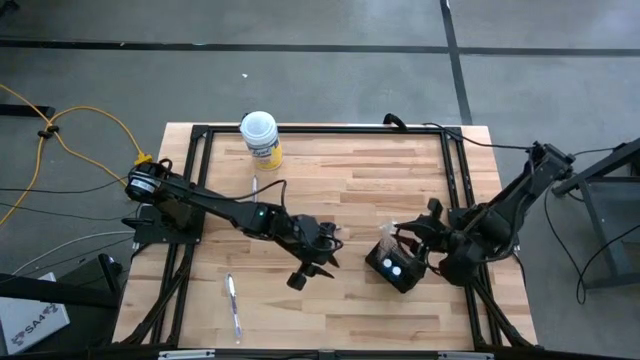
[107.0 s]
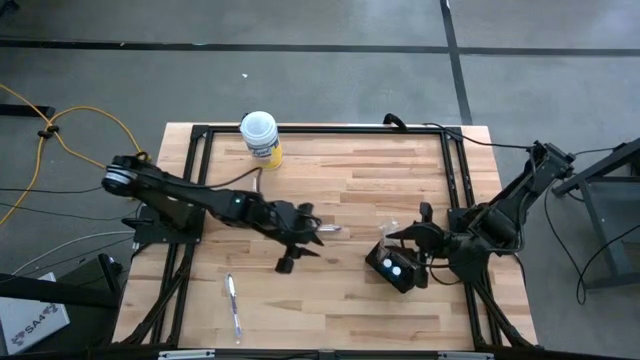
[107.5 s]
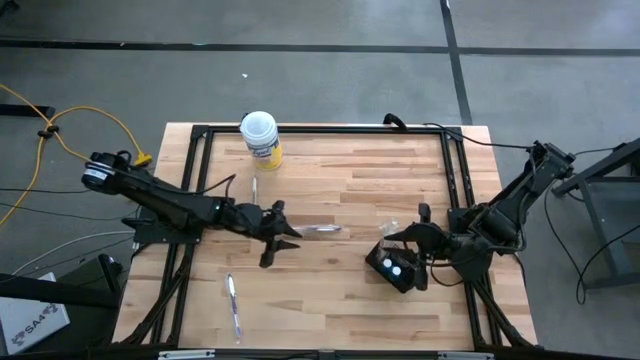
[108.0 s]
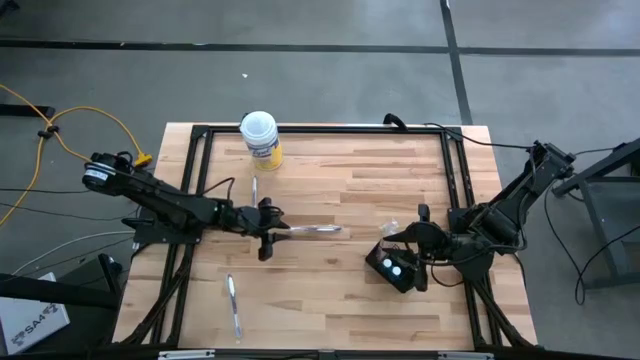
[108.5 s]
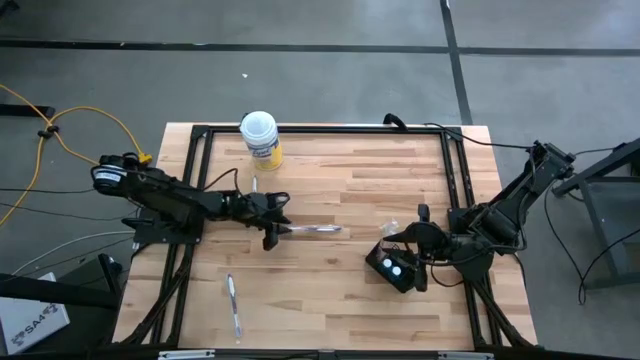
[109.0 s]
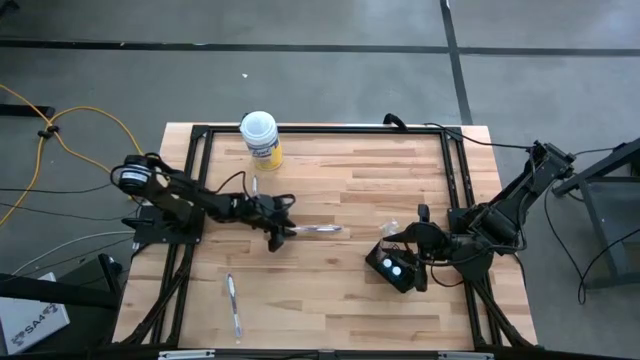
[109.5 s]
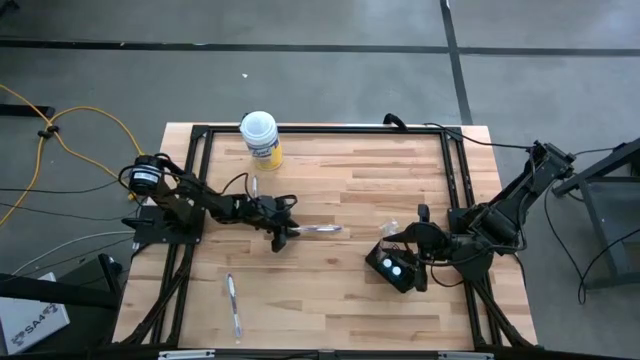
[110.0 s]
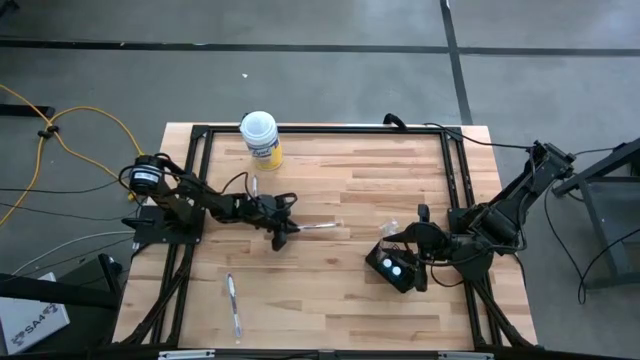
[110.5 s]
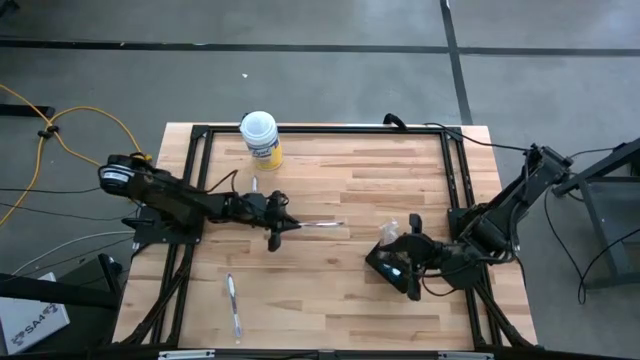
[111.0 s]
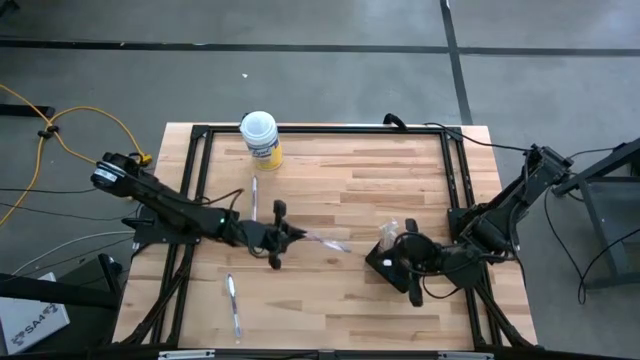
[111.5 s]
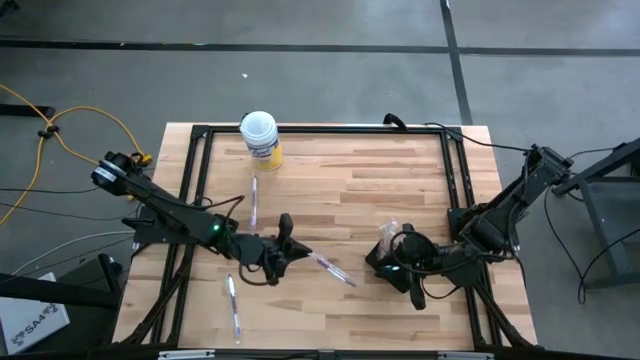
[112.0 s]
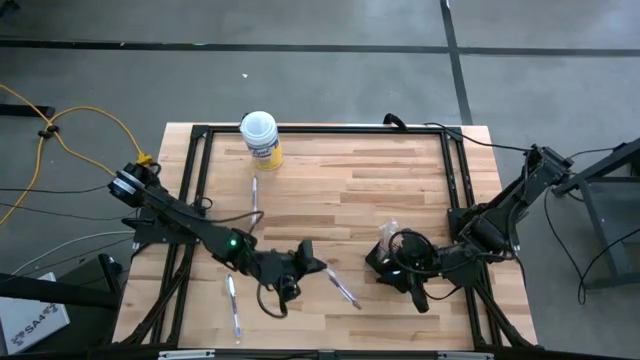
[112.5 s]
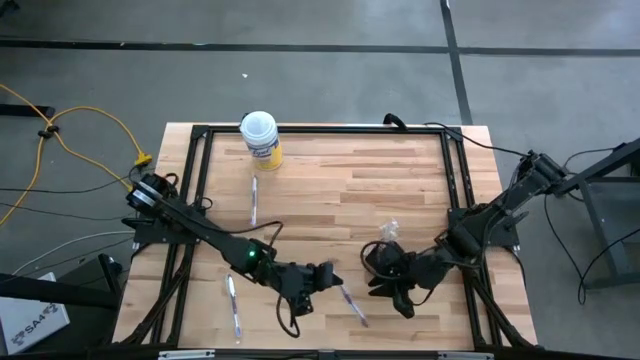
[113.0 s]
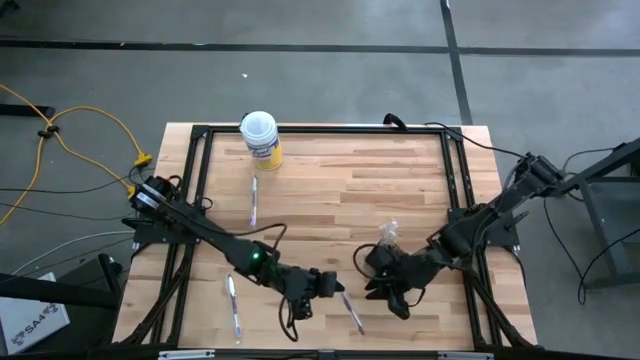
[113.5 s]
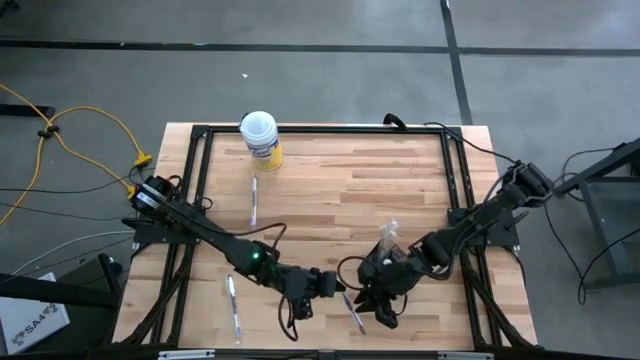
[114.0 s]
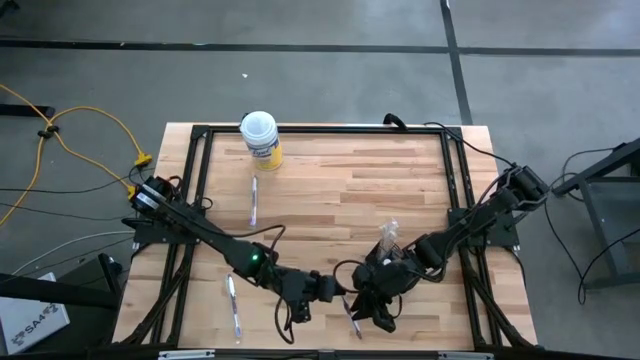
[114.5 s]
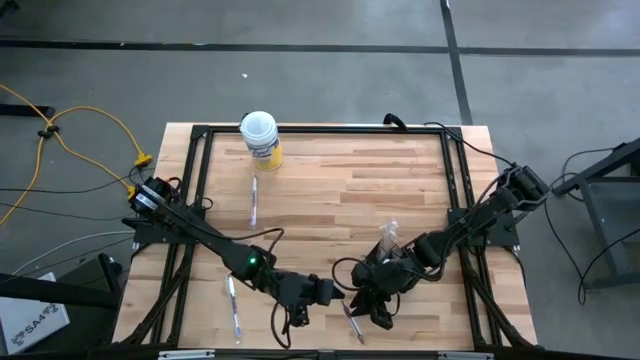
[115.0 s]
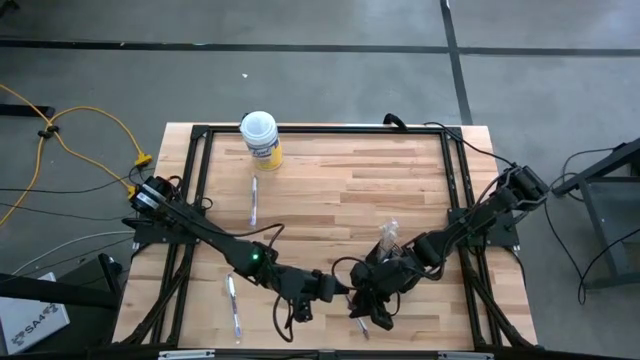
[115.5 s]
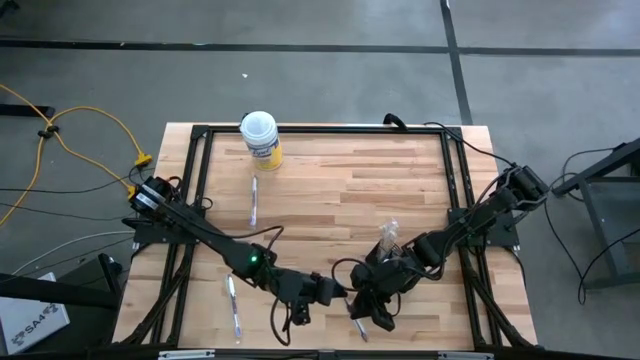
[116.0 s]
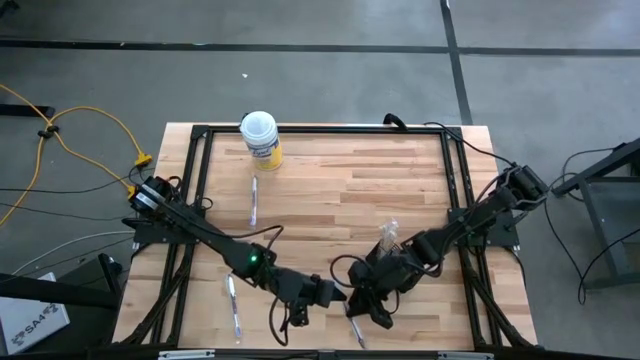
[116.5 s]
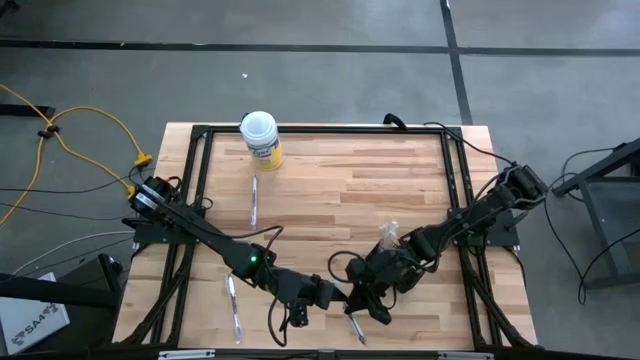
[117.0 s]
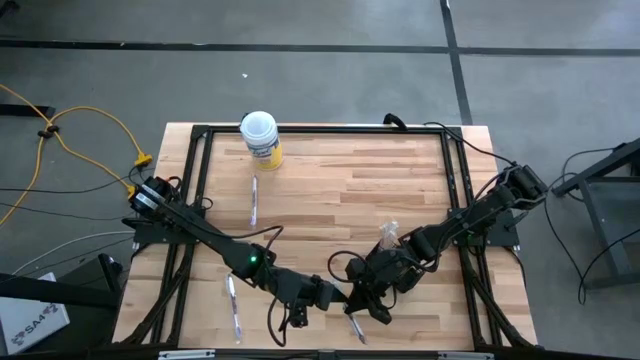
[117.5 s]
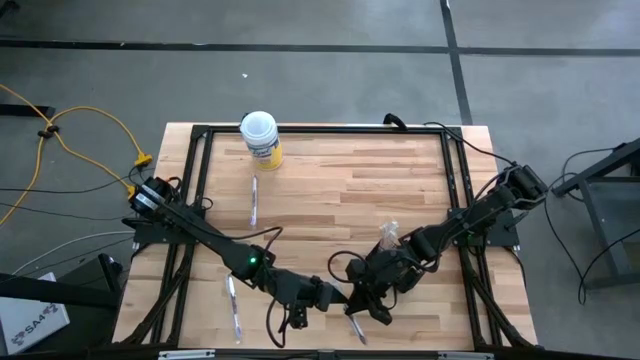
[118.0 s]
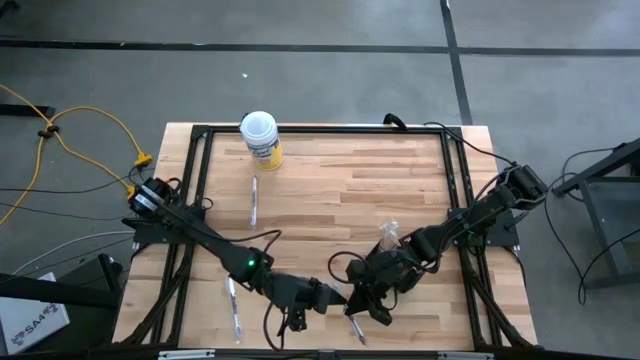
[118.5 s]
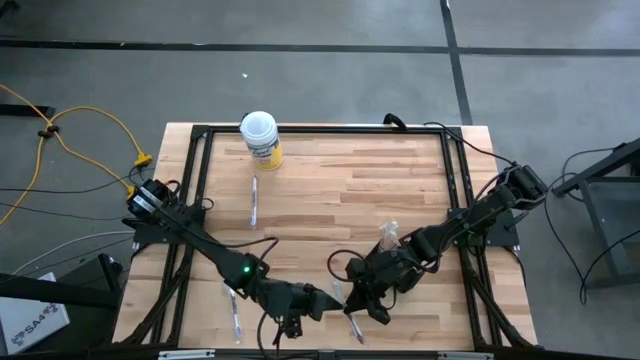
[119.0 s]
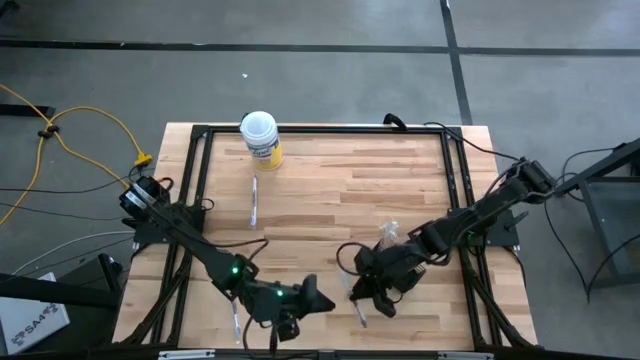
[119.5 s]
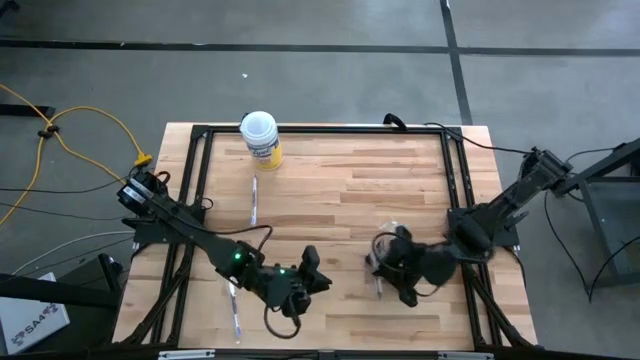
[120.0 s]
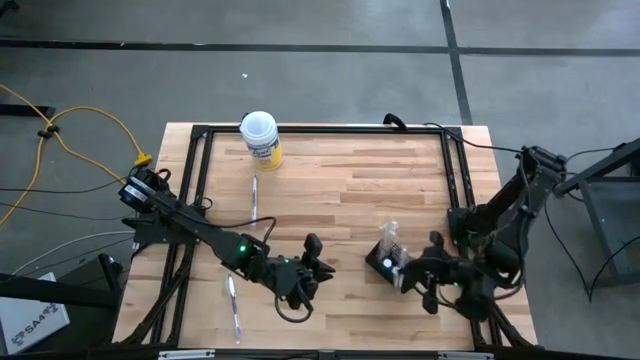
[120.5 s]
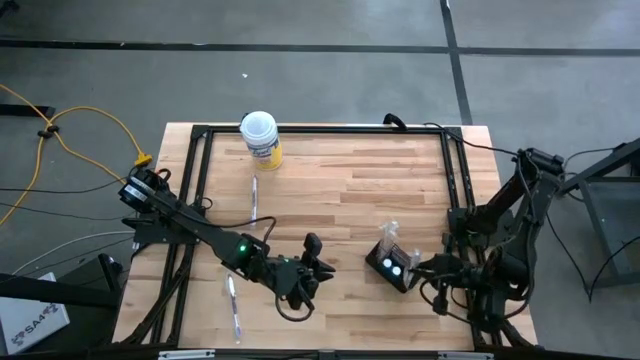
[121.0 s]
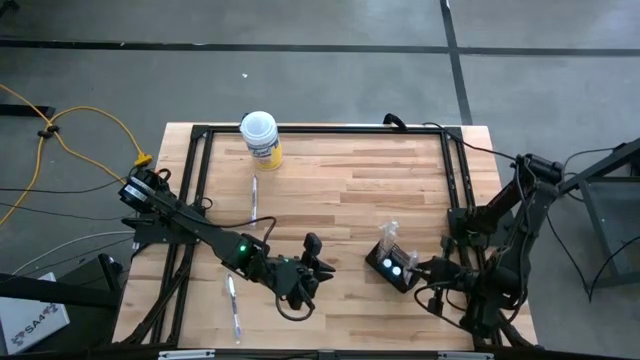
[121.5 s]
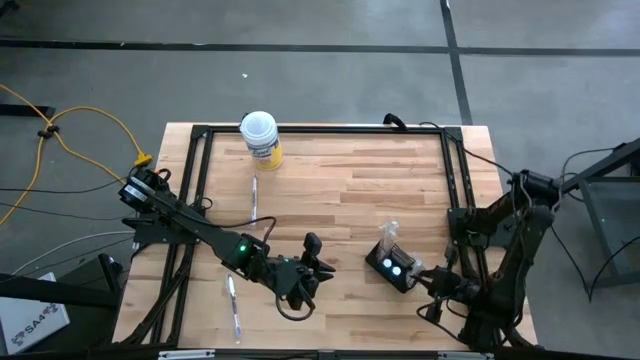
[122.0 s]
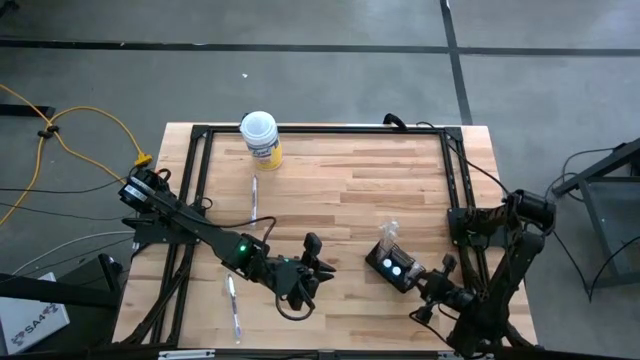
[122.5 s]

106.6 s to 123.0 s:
Task: Pick & Place toothbrushing station
Put the middle purple toothbrush into the wire organizer
